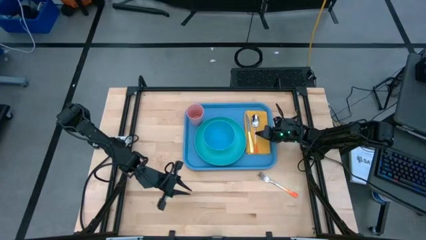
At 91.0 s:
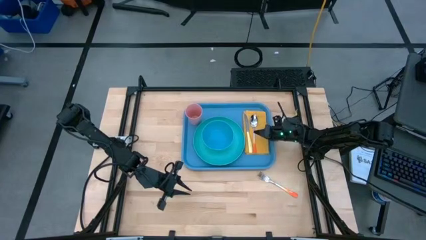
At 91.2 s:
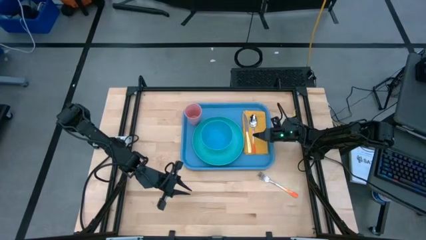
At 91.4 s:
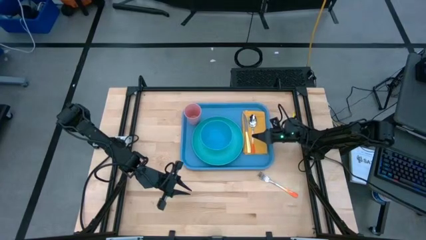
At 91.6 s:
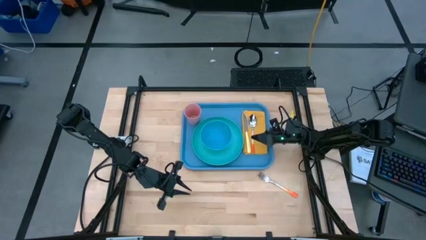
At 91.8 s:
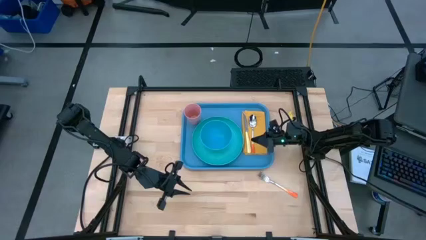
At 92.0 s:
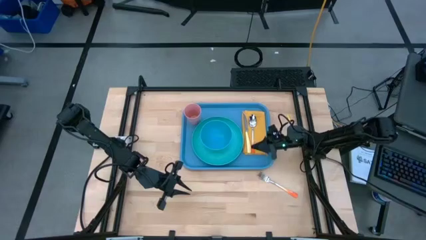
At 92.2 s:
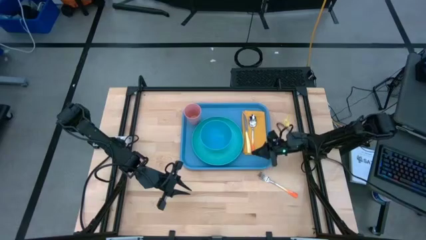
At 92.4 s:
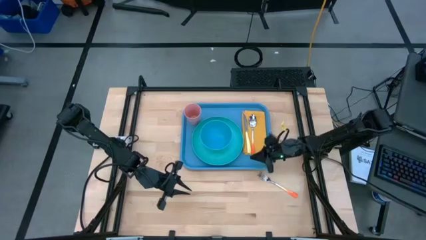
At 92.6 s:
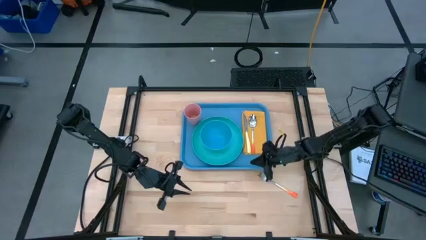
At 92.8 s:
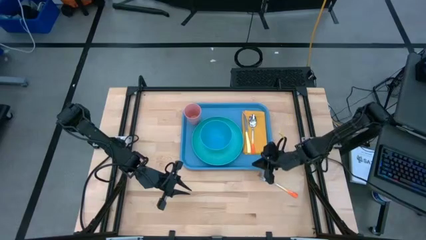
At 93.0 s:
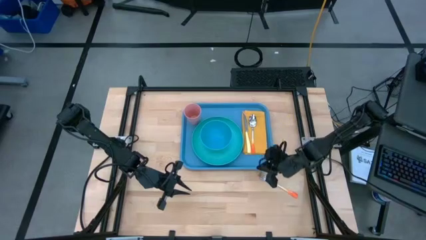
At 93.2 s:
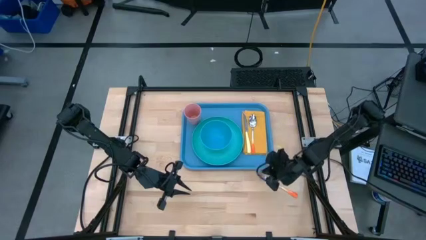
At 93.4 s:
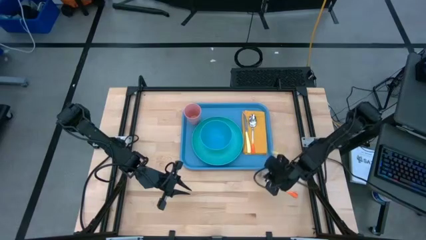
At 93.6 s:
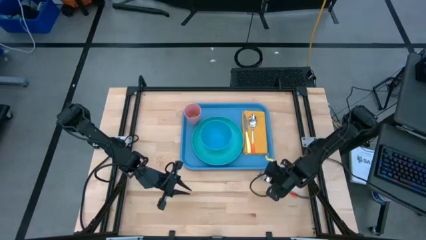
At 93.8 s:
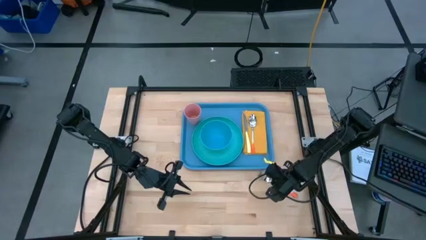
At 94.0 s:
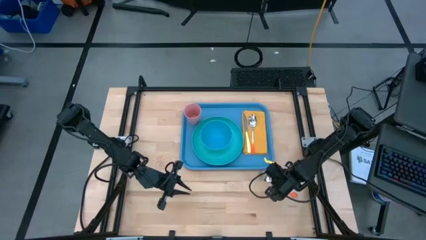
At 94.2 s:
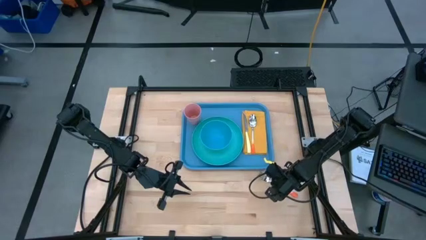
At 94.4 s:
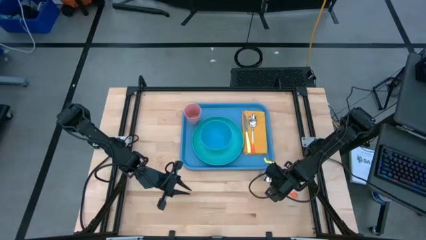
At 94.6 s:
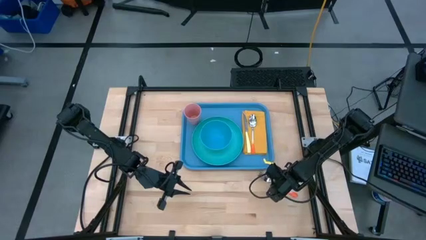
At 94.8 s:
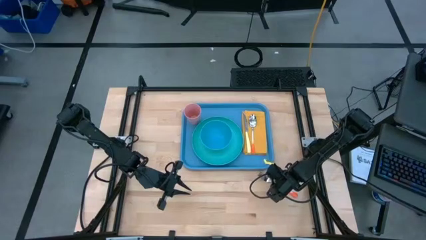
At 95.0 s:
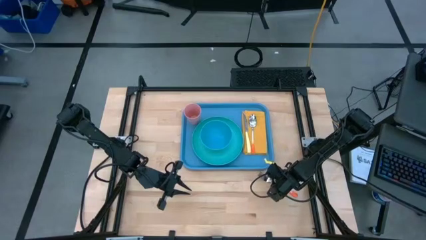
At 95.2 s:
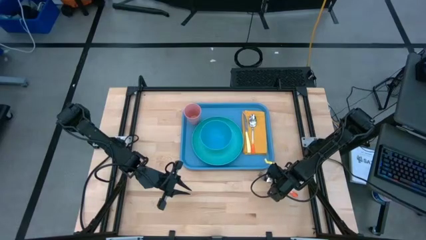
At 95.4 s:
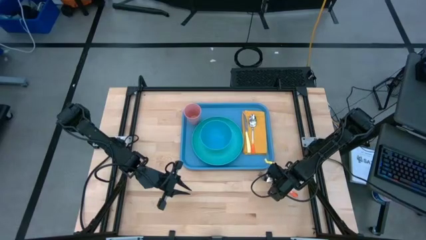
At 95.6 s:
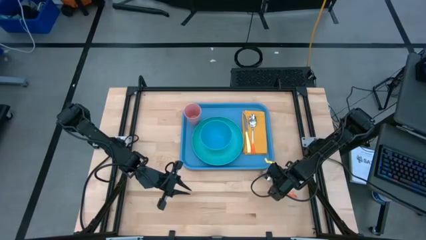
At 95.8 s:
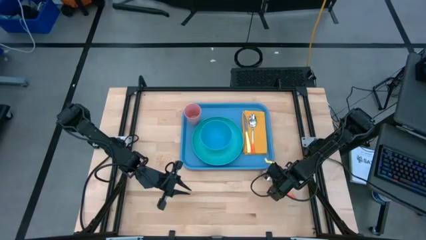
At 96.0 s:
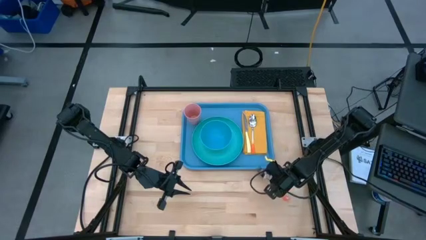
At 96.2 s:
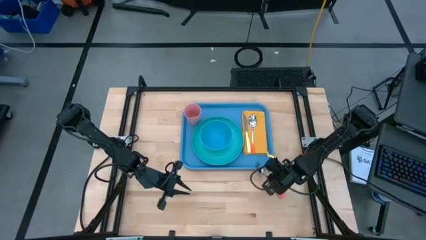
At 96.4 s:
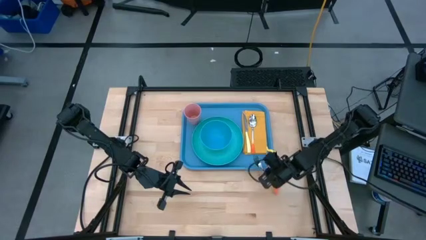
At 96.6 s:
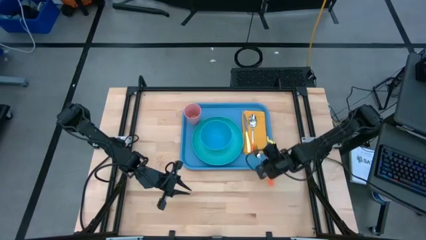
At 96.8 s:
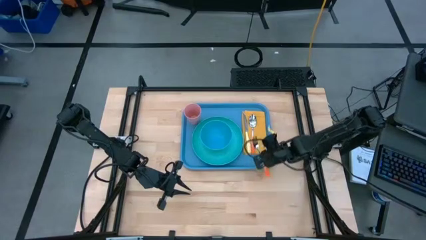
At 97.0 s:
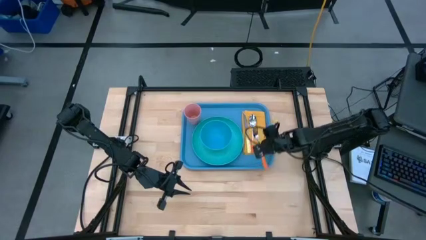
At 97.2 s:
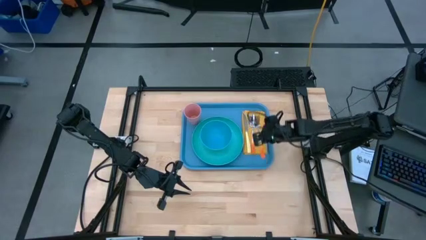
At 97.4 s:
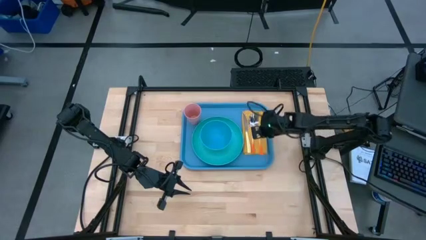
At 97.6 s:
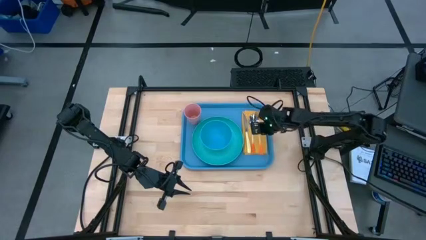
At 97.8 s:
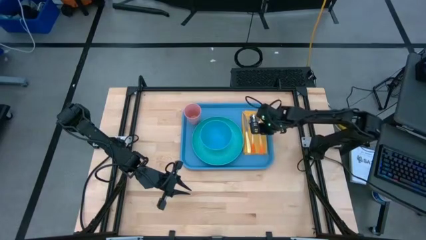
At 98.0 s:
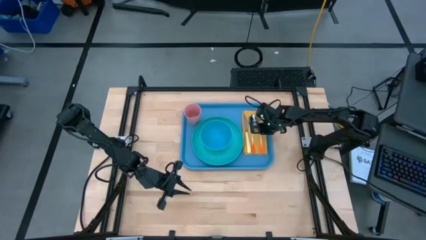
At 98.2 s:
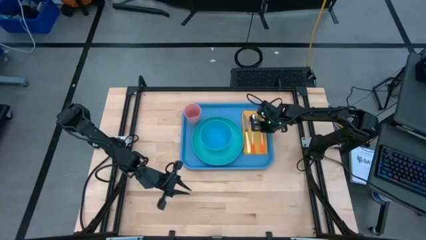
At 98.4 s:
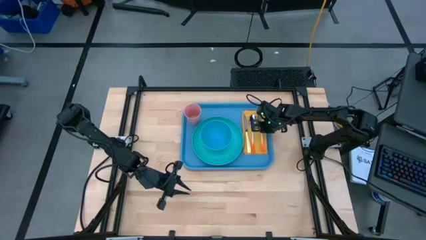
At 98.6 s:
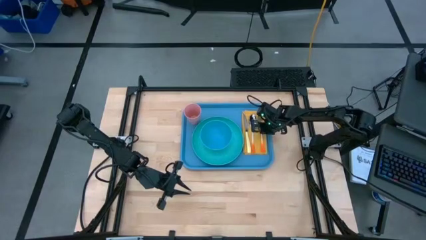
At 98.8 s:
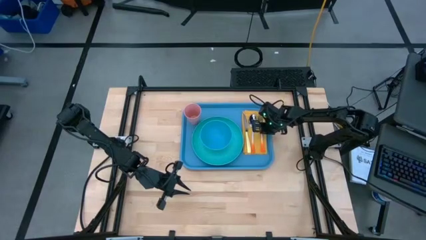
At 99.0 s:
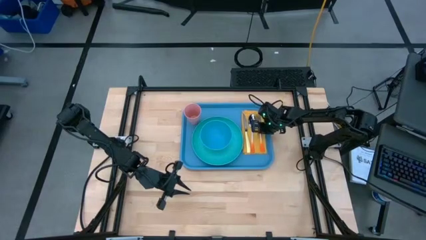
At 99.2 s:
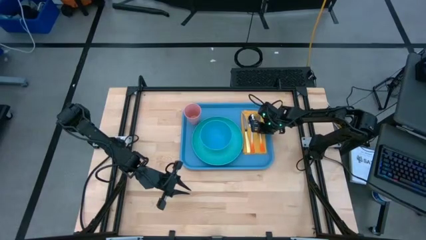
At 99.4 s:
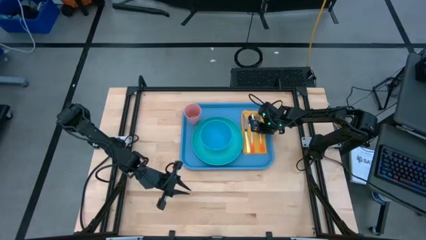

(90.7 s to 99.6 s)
Task: Set up tray
Put the orange fork on the blue serving tray to the right of the orange spoon

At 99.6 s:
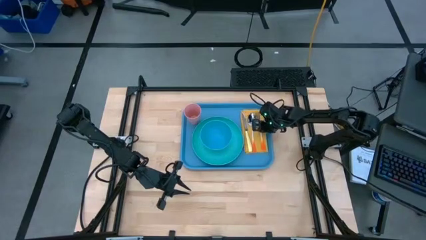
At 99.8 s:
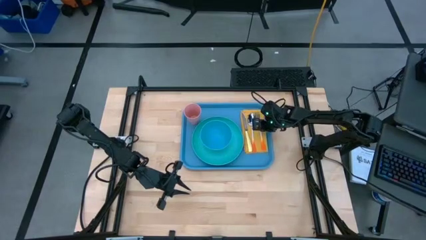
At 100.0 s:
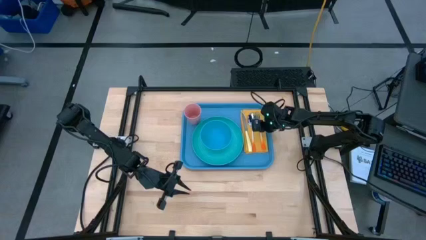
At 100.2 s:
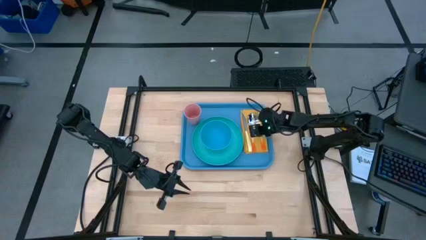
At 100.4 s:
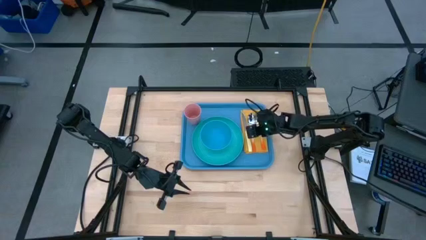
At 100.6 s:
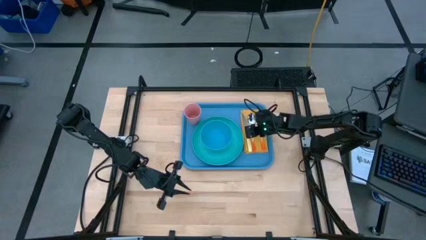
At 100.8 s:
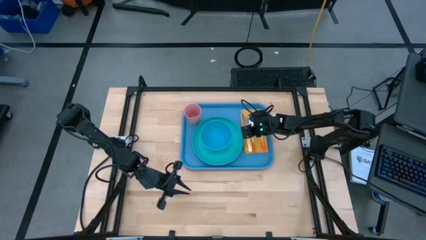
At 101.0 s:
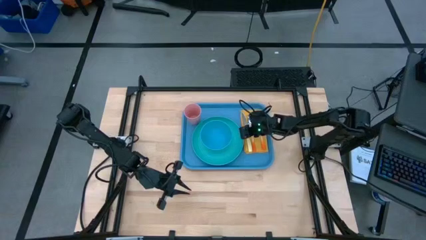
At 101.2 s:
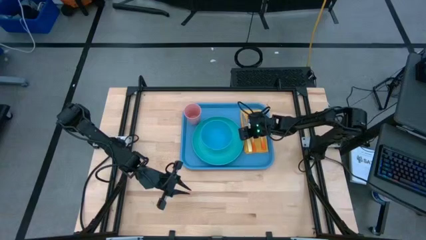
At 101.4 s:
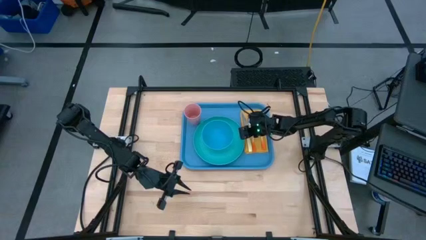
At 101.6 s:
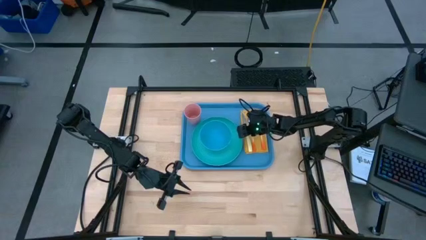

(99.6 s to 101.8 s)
Adjust the blue plate on the blue serving tray

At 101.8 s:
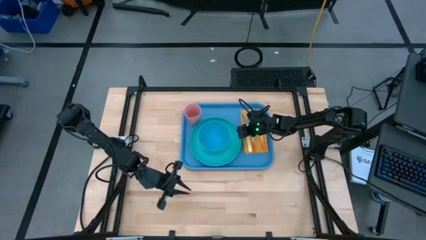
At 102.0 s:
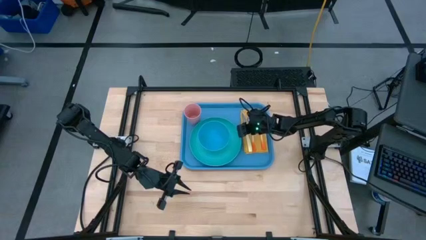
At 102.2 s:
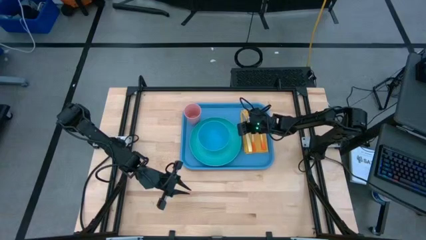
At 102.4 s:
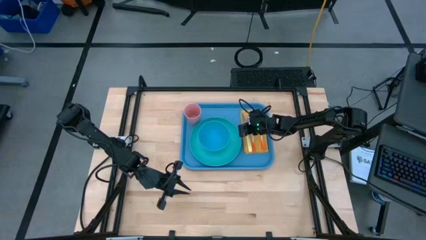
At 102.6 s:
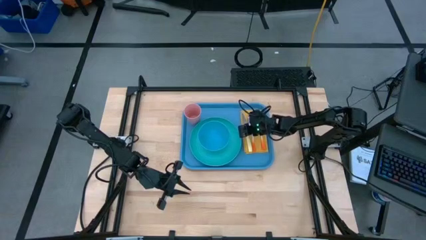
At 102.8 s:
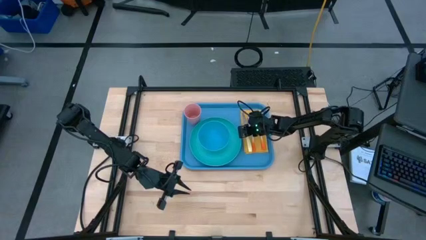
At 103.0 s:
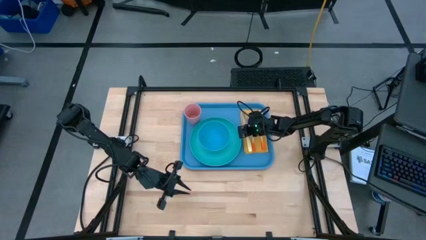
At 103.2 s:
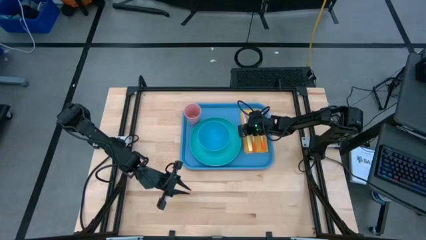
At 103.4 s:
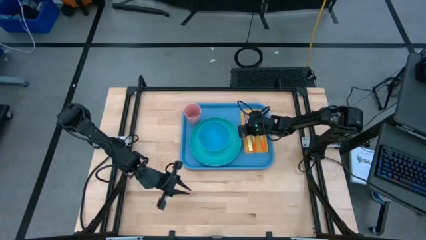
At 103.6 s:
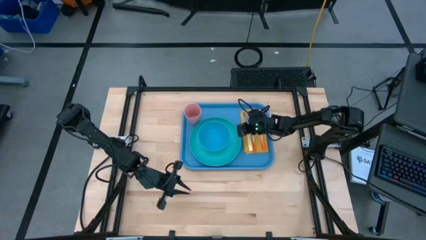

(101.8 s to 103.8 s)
Adjust the yellow knife on the yellow napkin
